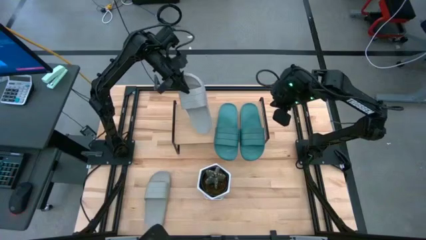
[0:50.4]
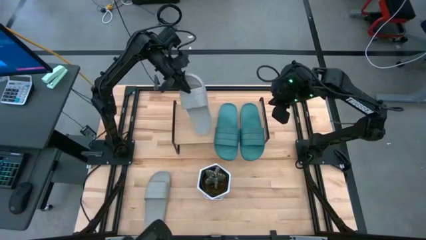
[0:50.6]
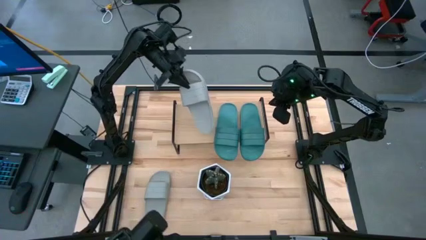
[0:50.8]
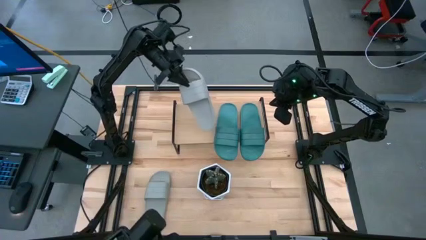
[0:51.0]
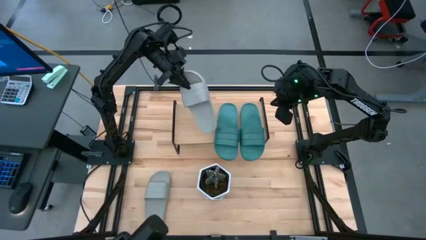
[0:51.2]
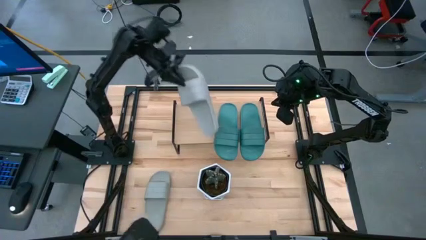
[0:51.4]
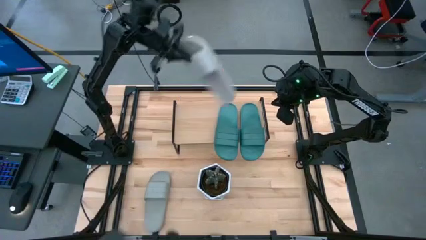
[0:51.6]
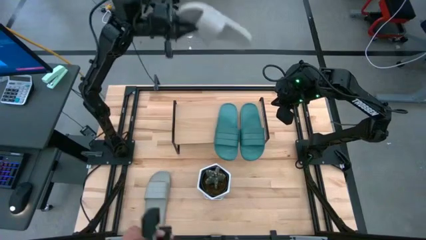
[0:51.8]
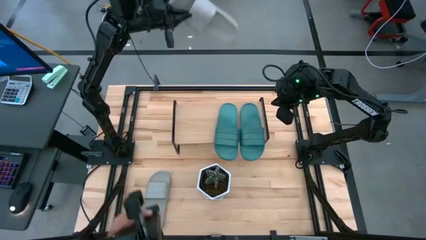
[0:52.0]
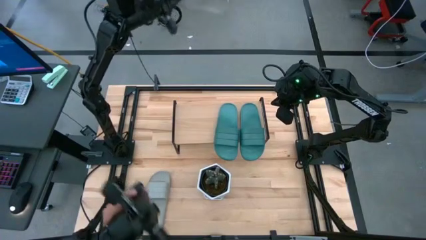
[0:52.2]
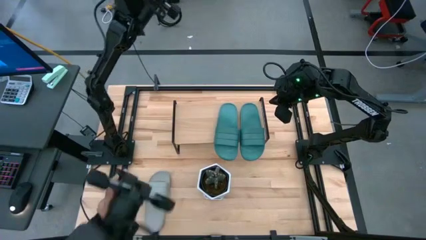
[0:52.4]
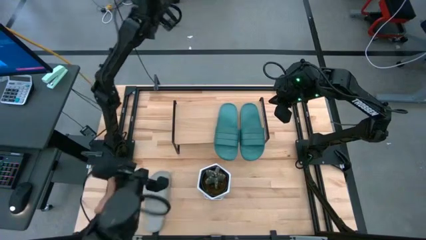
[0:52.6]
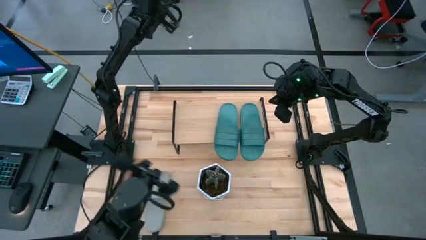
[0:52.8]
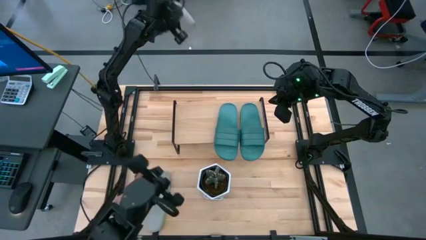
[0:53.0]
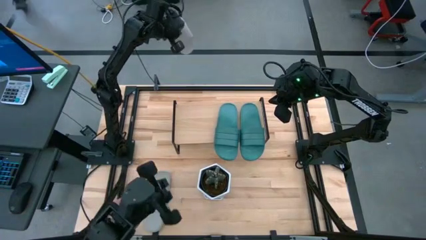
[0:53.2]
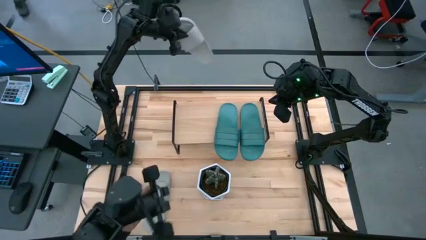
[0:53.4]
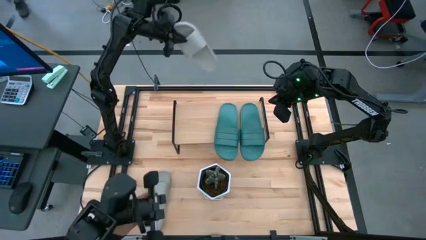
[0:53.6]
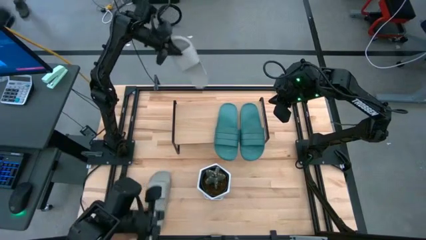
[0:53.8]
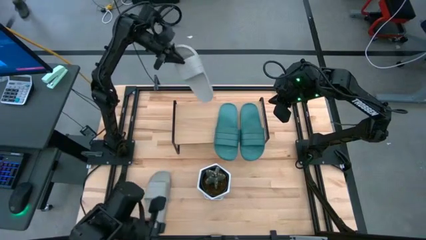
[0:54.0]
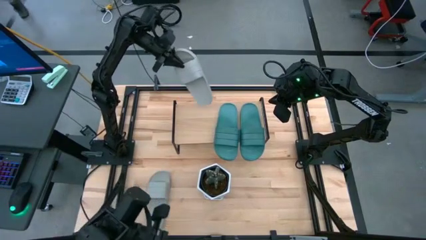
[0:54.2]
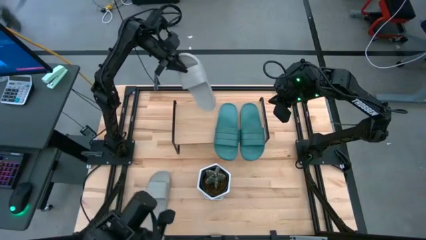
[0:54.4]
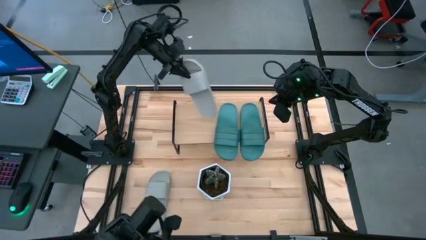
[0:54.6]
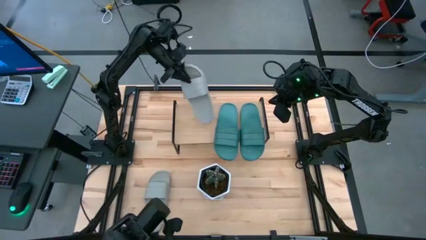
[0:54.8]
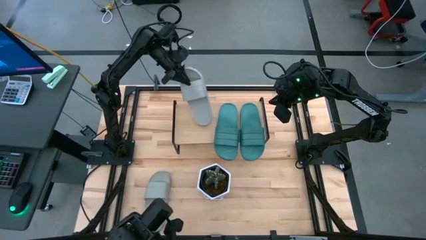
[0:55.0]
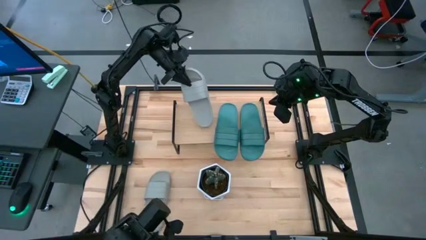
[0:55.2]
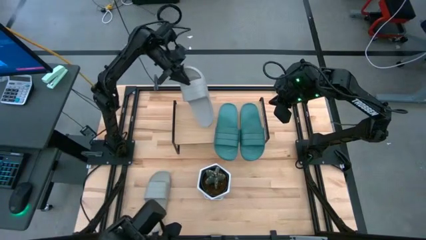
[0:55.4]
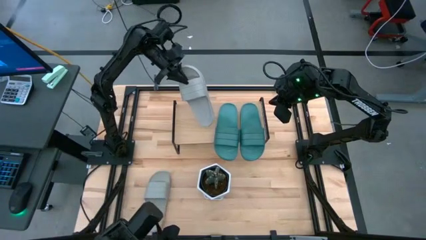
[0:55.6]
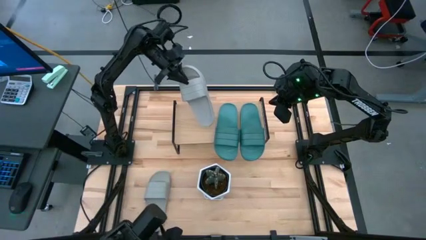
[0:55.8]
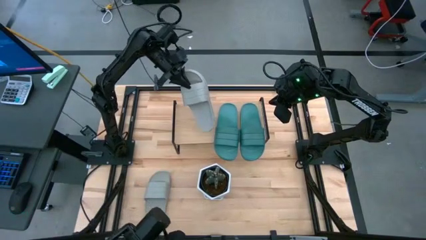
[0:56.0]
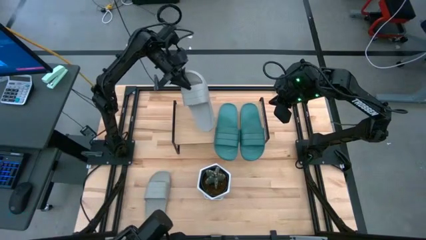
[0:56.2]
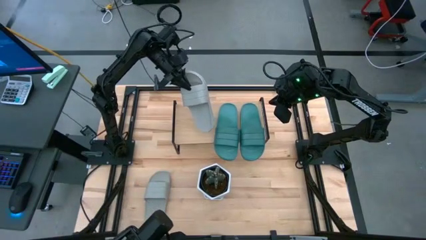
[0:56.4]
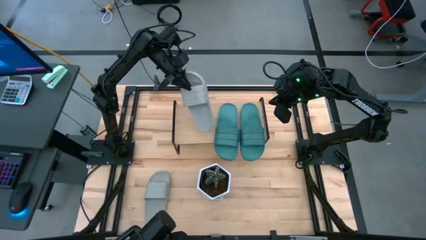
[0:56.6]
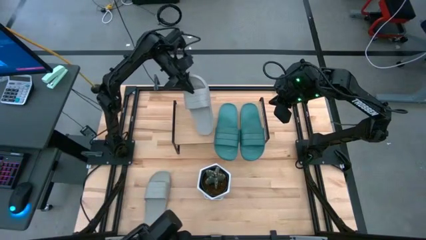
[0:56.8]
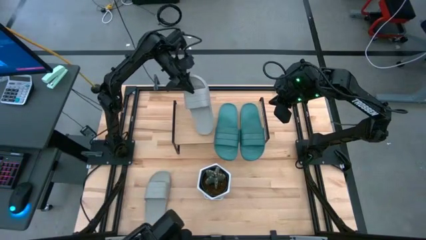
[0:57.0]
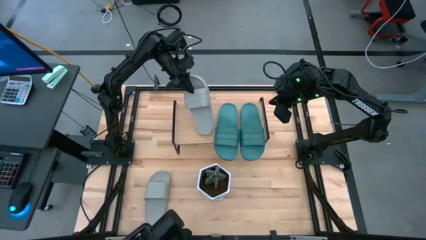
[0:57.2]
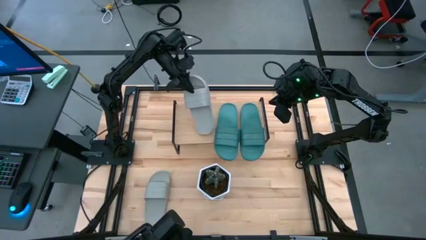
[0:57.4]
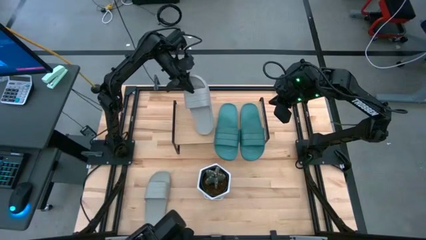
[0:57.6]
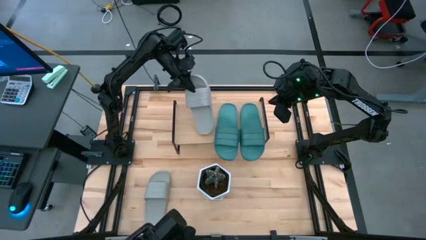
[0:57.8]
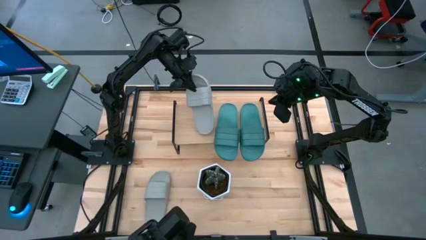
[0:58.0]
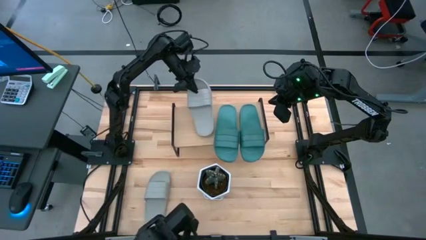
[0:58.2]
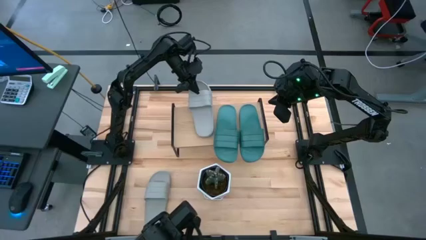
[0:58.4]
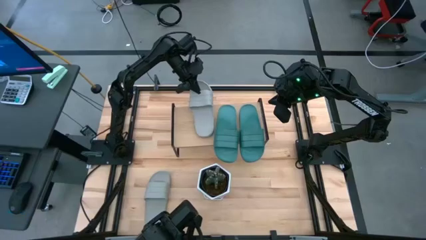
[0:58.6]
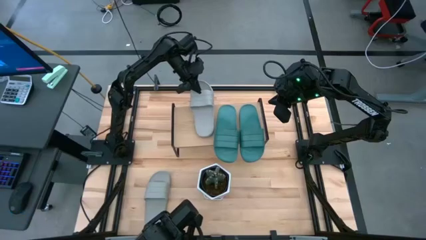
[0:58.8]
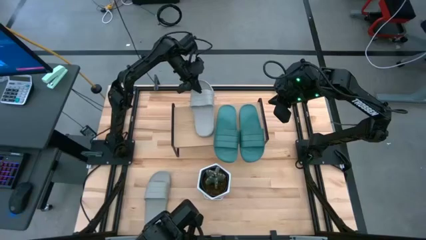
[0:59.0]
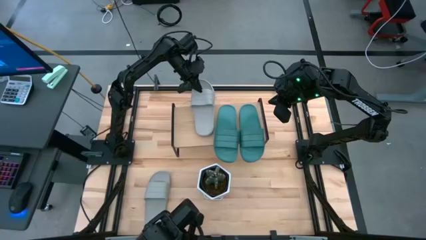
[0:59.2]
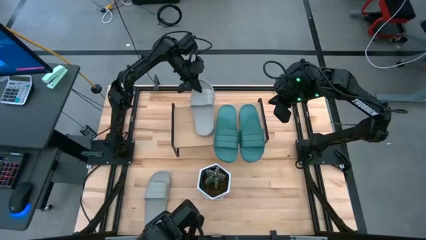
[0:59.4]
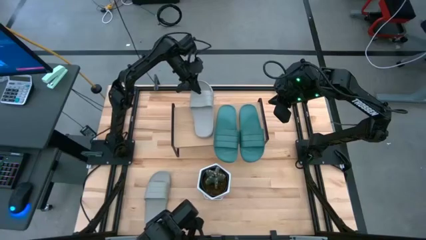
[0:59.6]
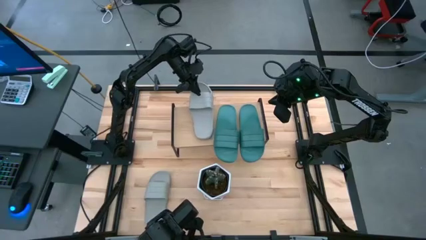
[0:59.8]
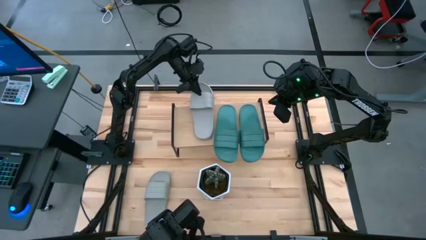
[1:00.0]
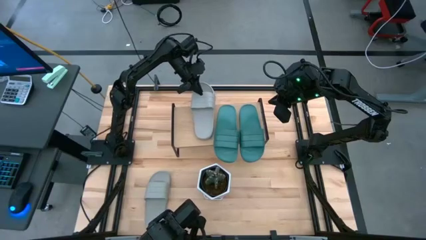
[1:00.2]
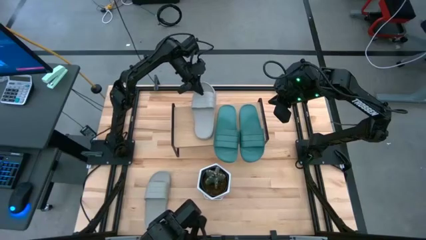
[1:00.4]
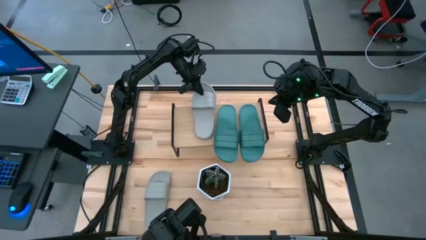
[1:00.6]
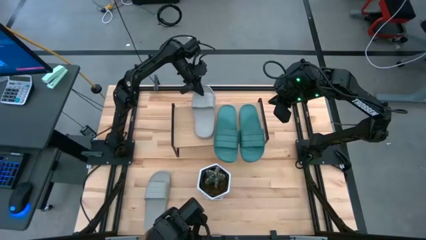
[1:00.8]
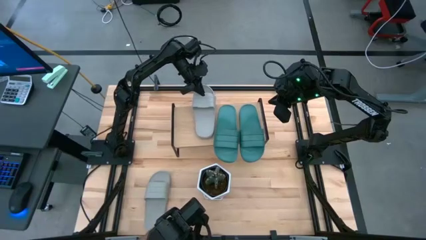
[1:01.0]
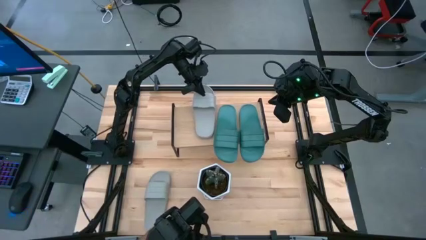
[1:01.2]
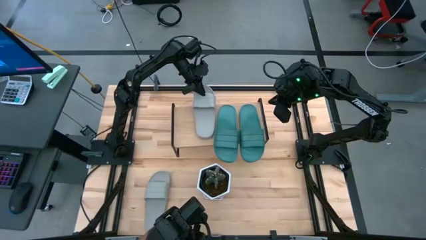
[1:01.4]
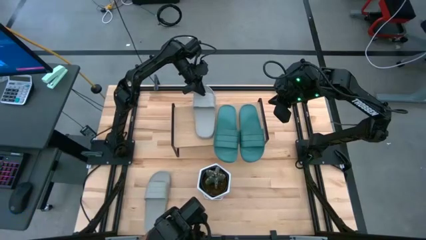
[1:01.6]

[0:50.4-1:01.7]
Task: Pick and place slides into the shelf
Put the right gray slide on the shelf

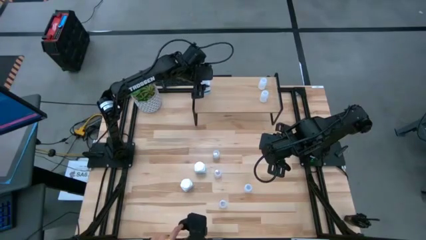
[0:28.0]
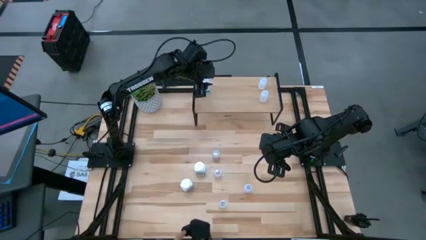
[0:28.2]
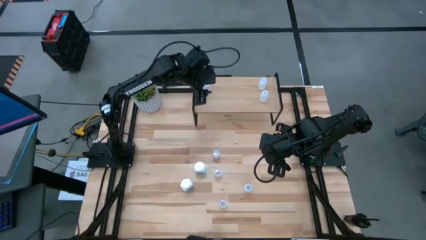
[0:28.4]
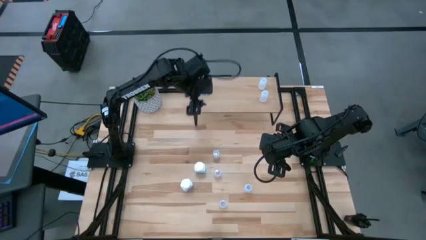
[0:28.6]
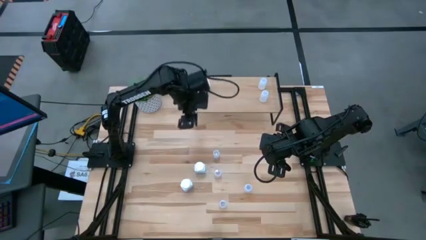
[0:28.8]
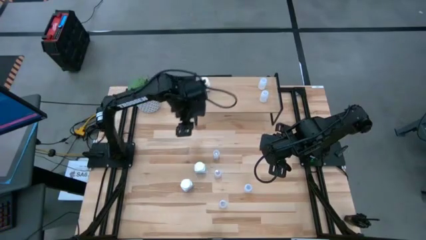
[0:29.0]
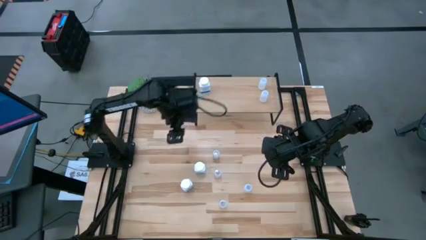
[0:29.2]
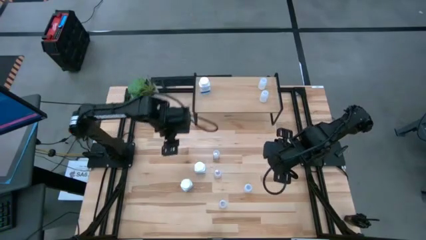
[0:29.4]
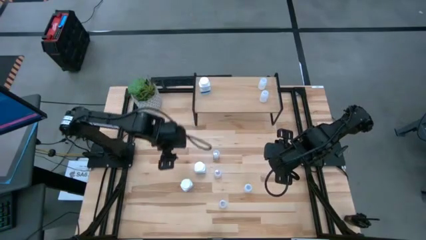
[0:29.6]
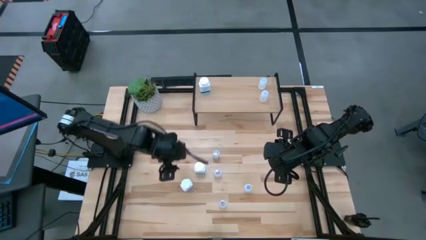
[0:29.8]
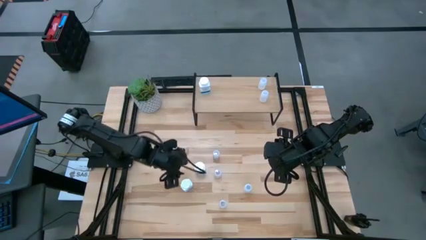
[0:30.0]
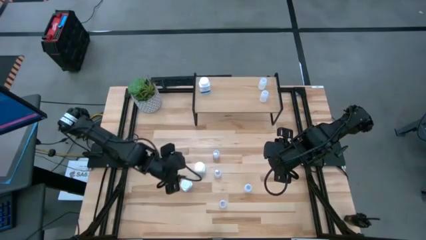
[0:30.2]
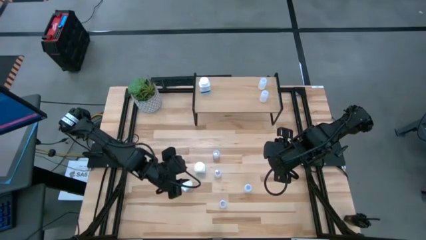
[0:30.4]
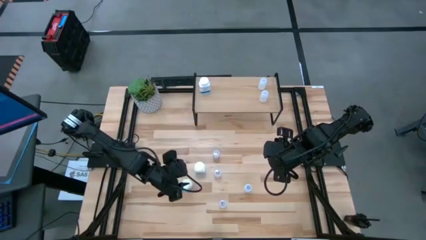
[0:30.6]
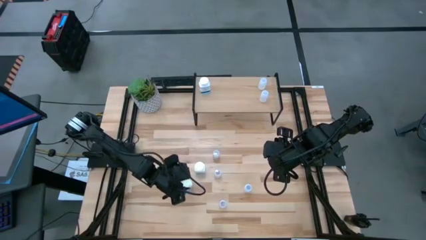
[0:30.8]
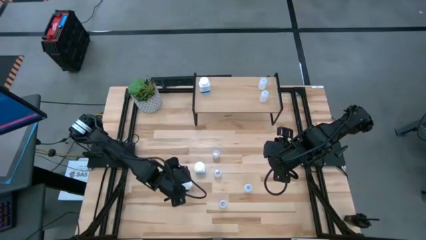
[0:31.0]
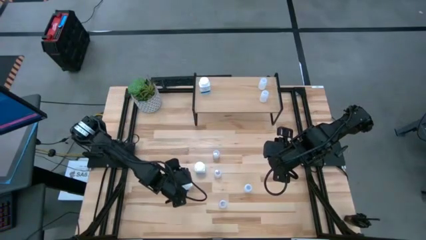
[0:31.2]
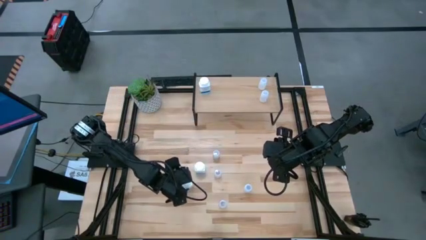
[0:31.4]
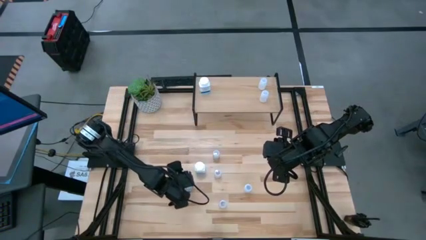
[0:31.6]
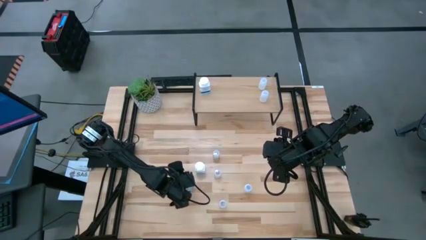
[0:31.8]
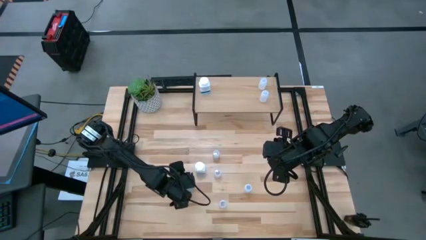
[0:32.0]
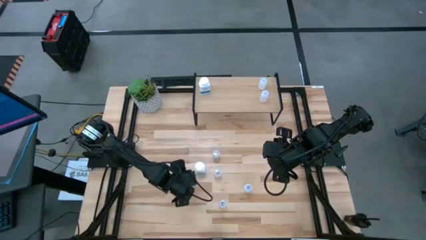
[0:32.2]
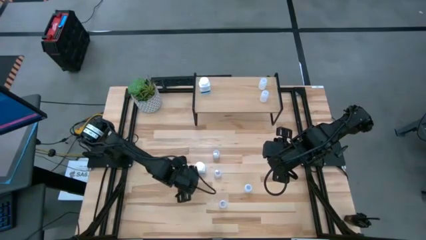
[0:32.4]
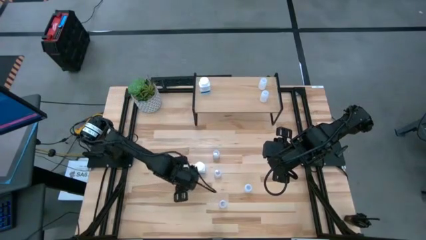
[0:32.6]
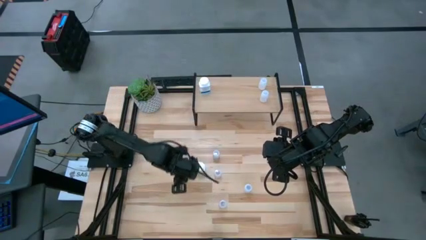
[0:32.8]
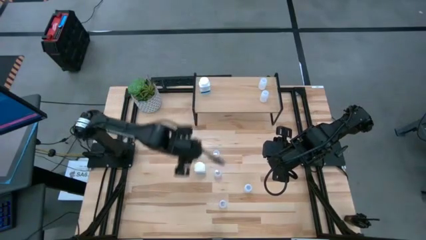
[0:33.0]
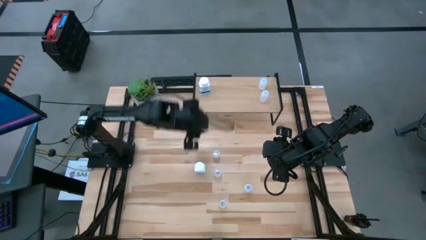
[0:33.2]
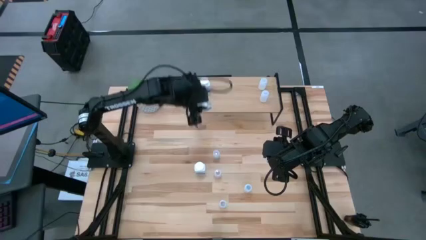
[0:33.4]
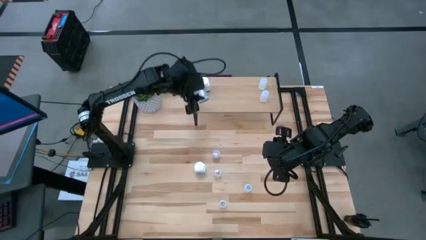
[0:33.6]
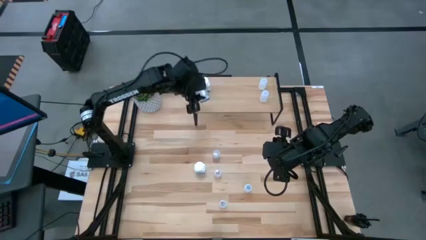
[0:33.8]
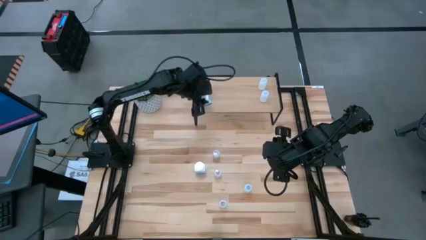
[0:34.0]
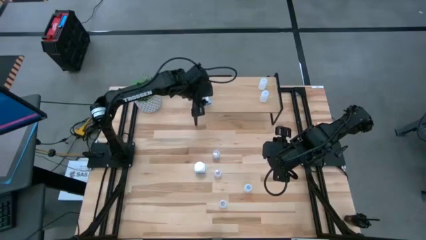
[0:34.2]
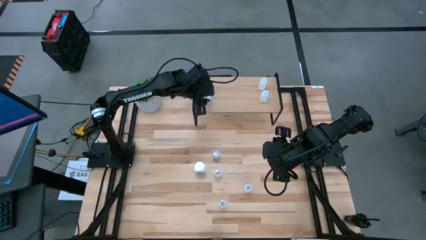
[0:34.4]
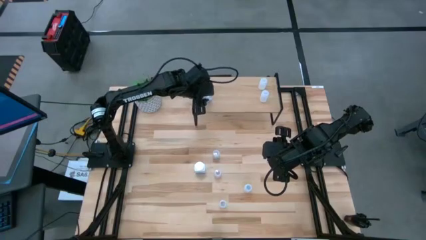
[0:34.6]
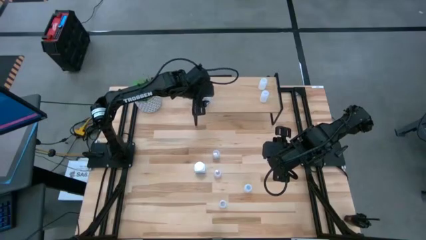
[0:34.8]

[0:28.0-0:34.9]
Task: Pick and place medicine bottles onto shelf by color
Put the bottom big white pill bottle on the shelf aligned with the other big white pill bottle
